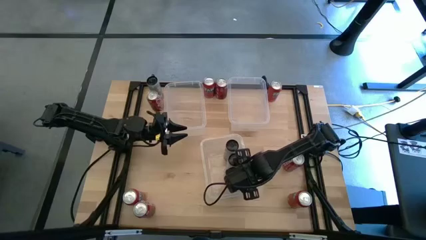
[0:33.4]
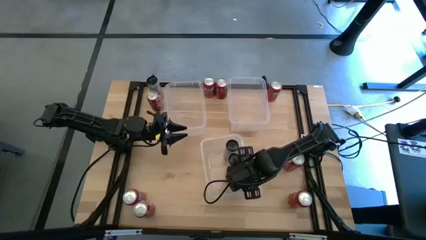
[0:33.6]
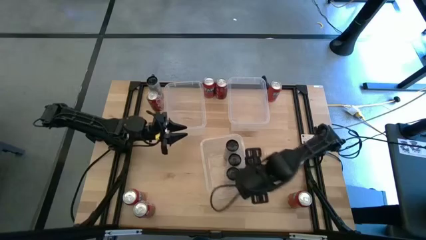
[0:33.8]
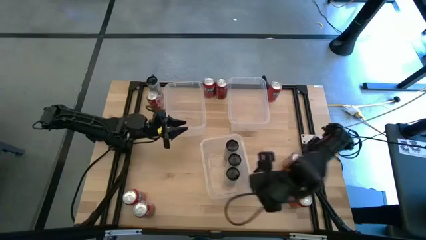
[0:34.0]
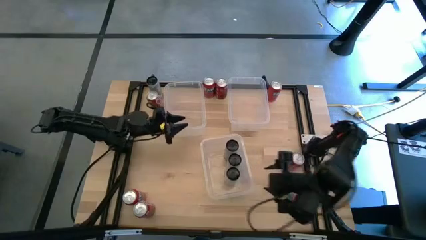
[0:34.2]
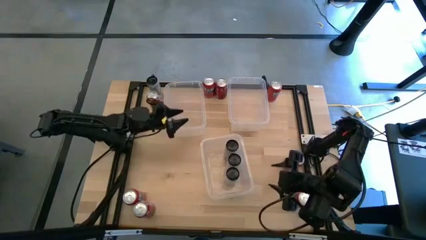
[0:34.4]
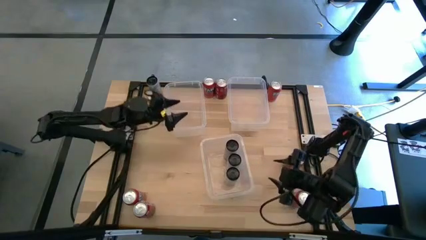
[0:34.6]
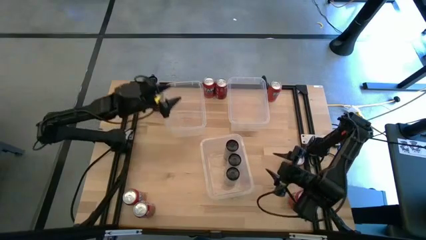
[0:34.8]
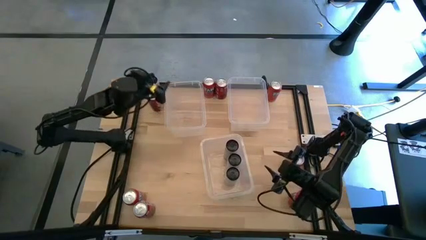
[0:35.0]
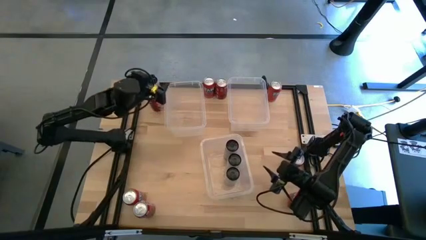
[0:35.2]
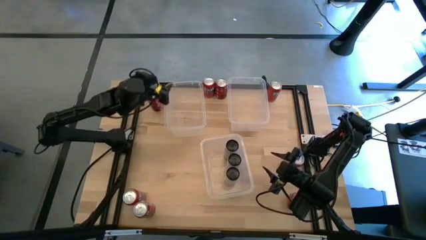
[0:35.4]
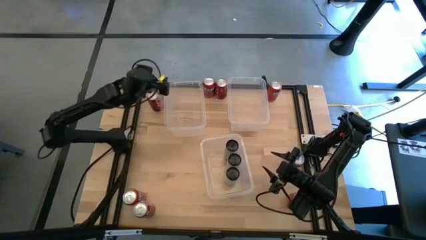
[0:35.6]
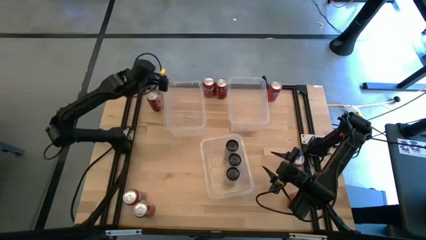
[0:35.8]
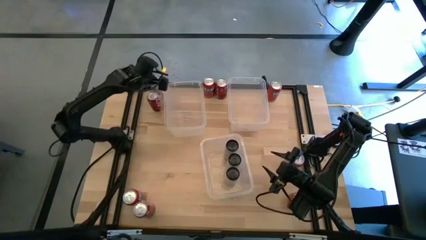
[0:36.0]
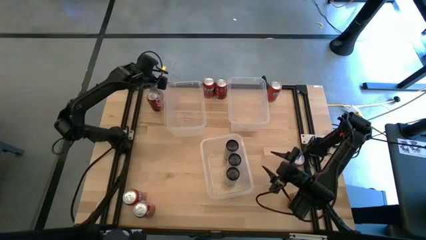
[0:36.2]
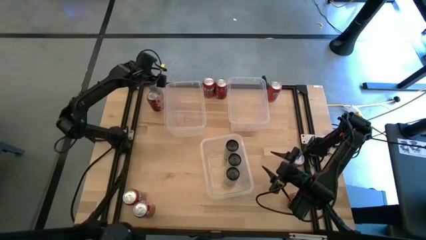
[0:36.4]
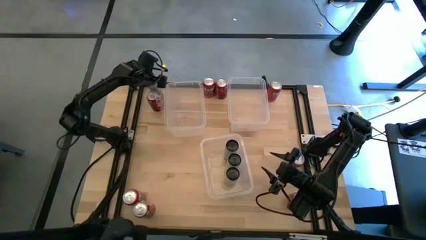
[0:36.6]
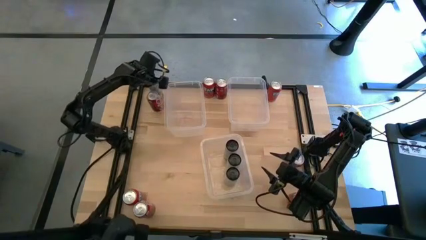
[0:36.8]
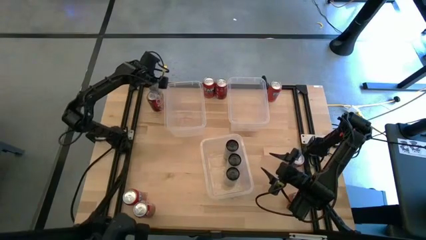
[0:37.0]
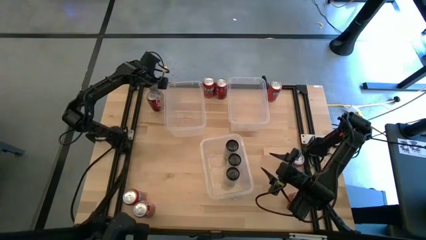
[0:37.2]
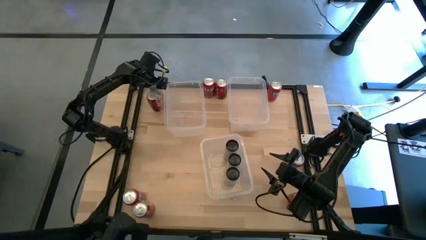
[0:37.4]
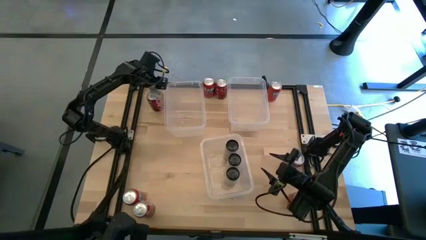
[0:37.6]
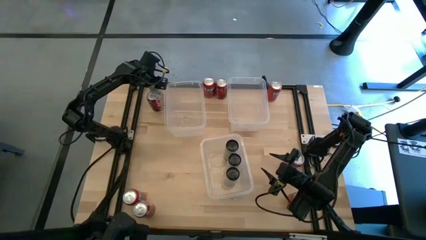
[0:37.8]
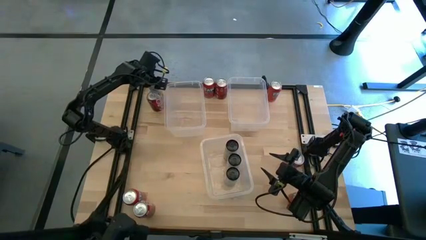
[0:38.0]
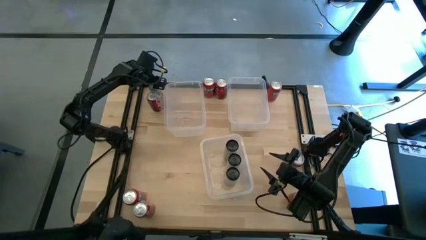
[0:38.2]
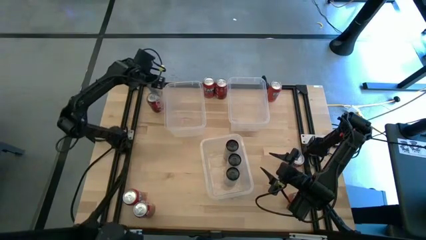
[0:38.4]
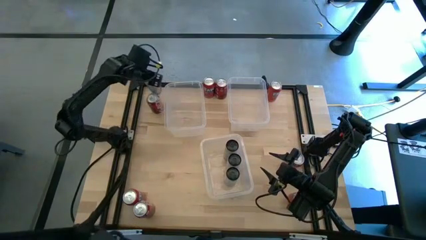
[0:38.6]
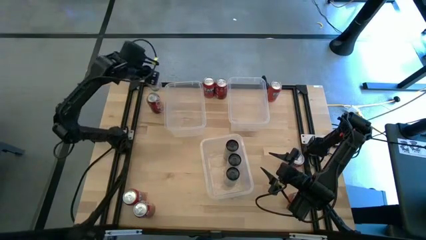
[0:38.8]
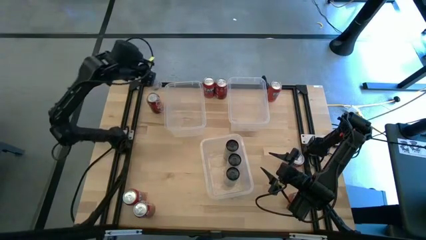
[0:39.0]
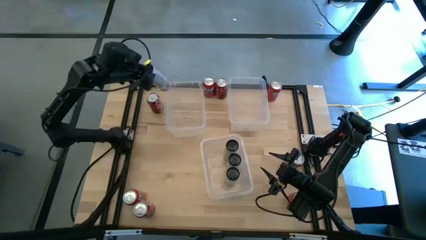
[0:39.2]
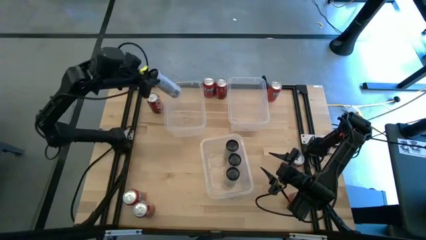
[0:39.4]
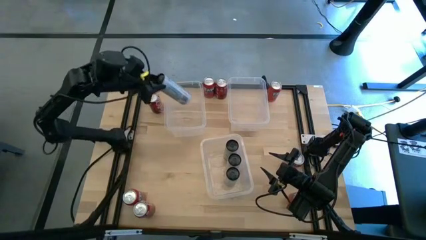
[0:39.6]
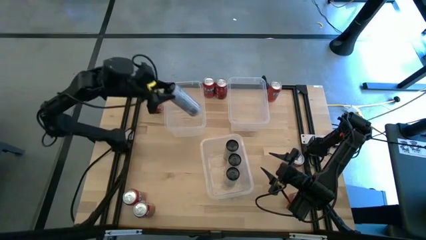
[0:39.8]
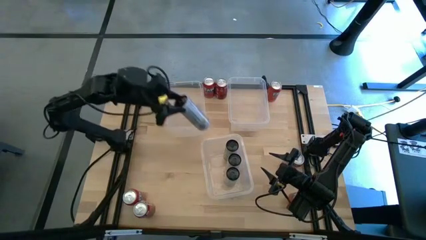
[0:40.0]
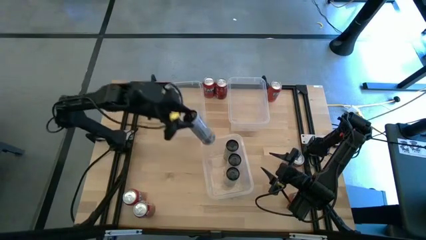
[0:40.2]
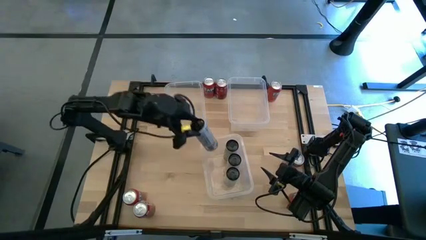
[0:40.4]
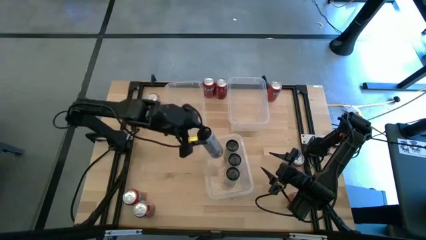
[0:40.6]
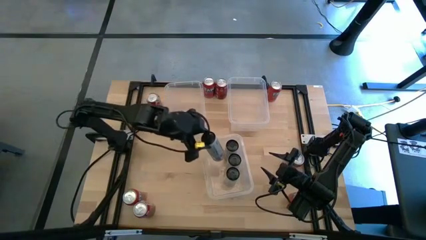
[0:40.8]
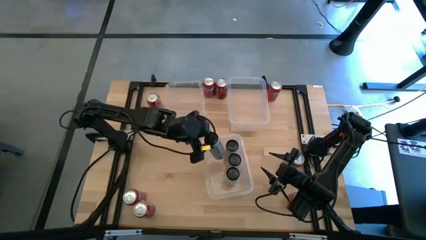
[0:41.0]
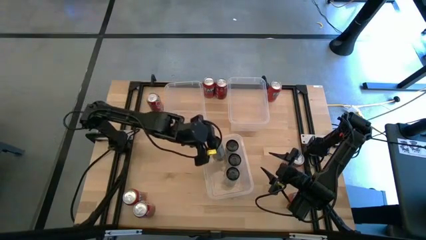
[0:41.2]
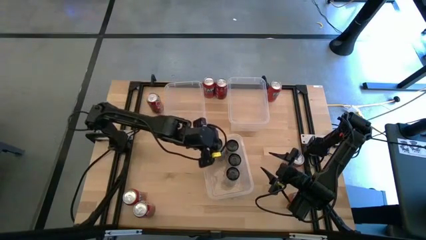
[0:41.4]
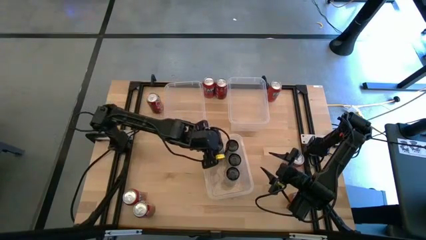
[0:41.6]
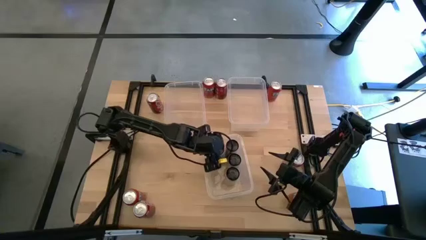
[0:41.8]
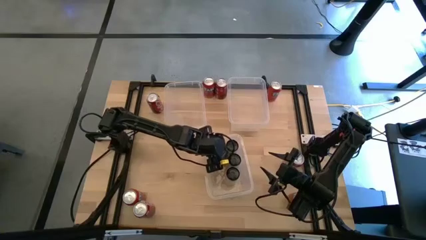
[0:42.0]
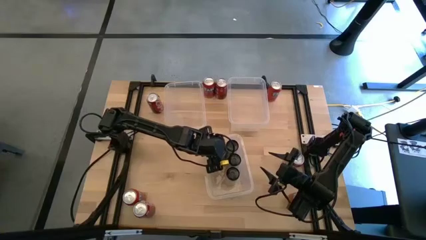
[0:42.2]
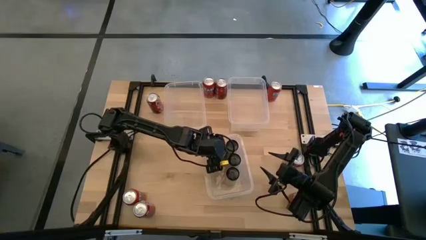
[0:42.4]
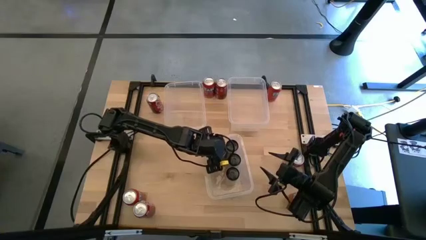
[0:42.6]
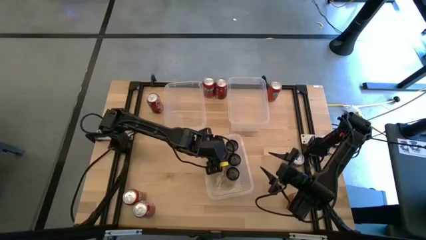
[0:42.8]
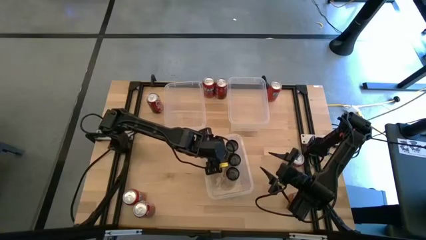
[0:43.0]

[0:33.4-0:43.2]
Task: Sort soda cans
Put the white/yellow soda can into the bottom transparent bin

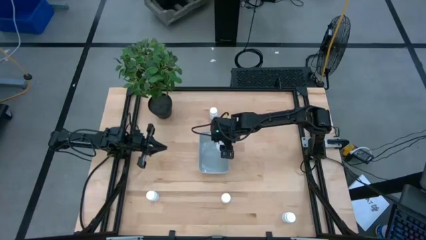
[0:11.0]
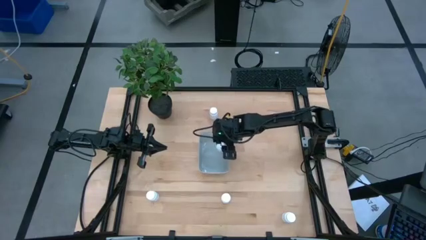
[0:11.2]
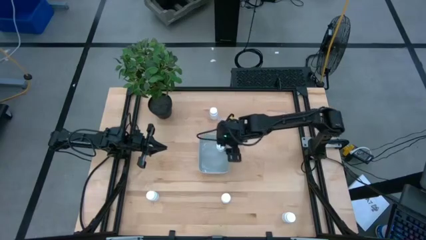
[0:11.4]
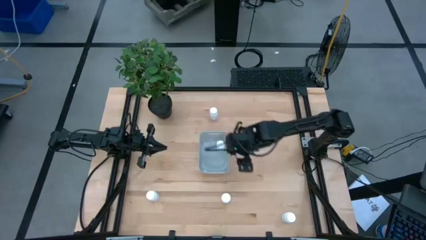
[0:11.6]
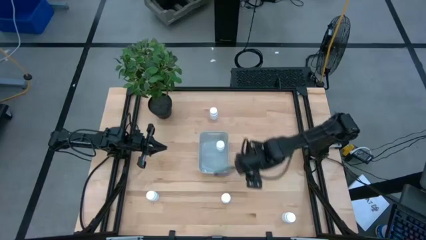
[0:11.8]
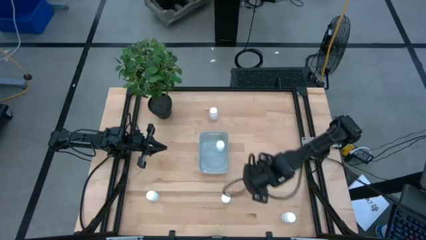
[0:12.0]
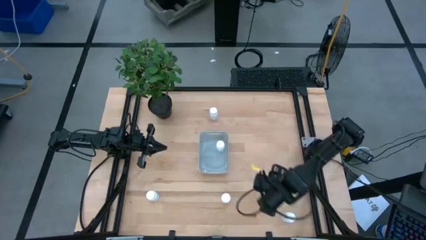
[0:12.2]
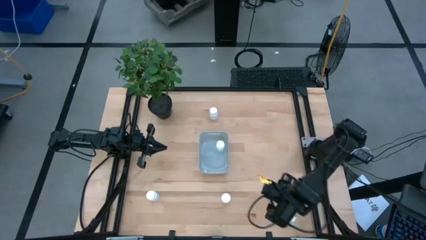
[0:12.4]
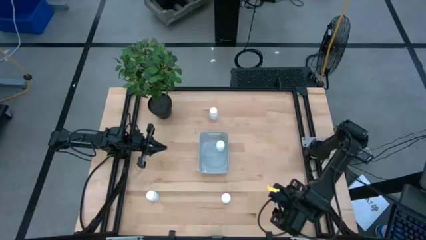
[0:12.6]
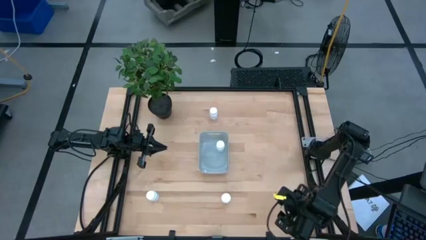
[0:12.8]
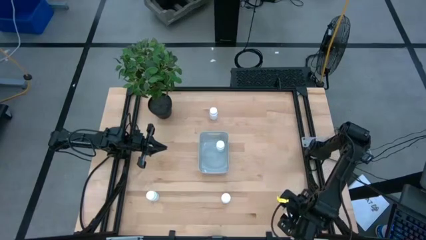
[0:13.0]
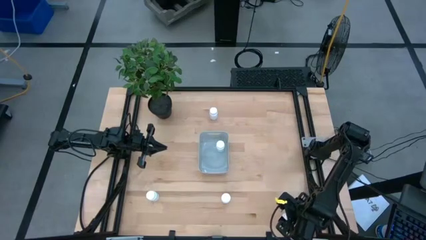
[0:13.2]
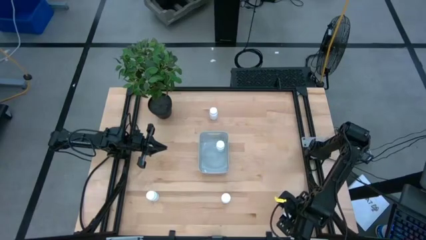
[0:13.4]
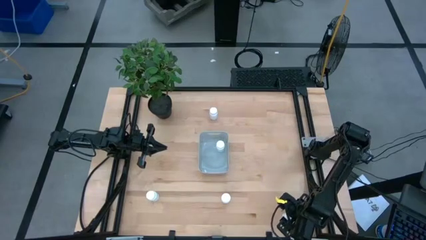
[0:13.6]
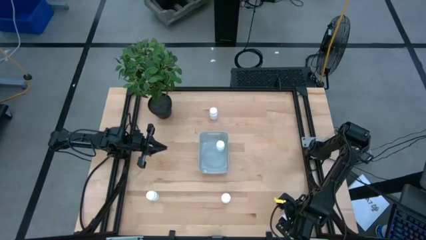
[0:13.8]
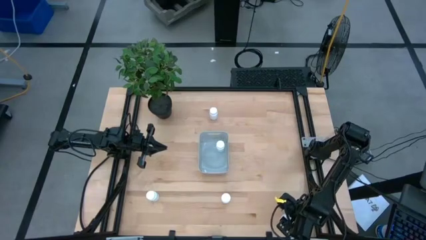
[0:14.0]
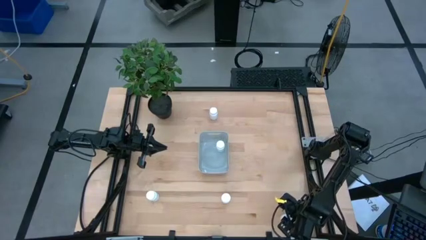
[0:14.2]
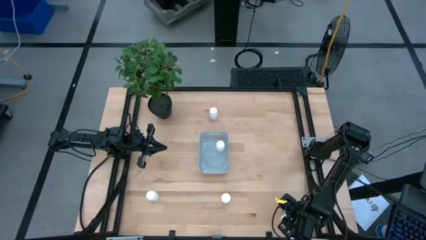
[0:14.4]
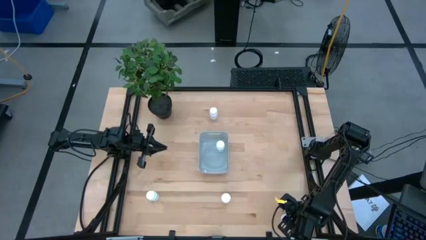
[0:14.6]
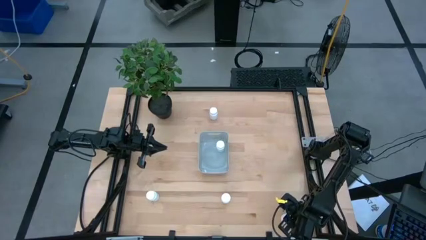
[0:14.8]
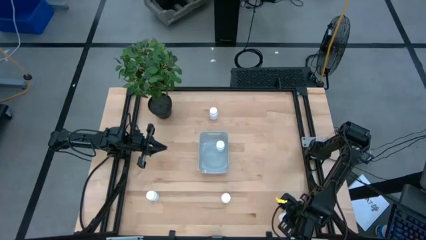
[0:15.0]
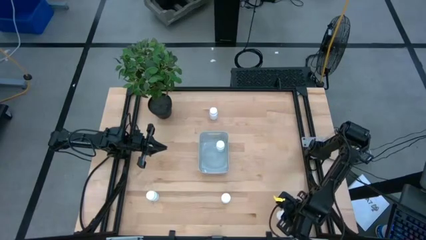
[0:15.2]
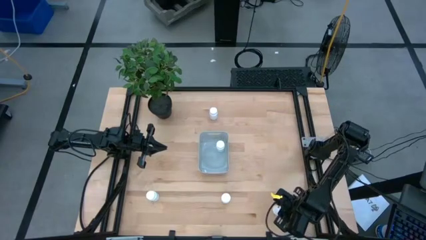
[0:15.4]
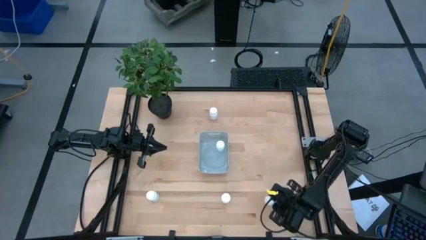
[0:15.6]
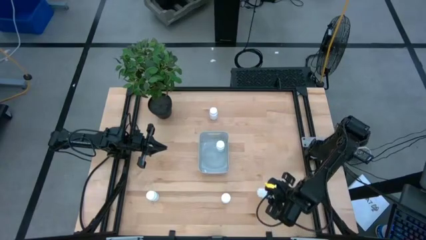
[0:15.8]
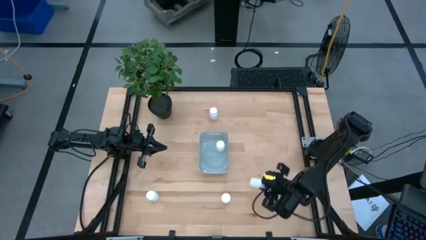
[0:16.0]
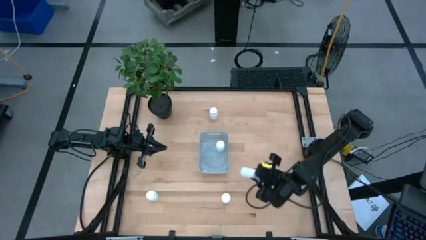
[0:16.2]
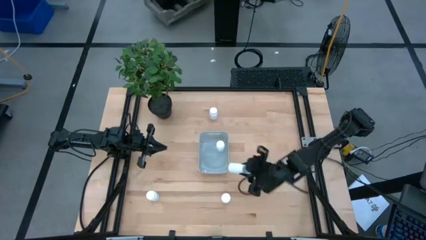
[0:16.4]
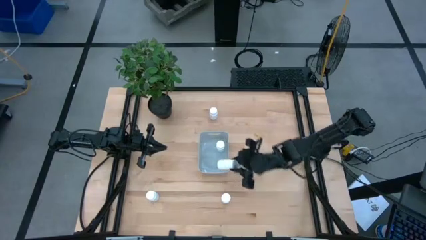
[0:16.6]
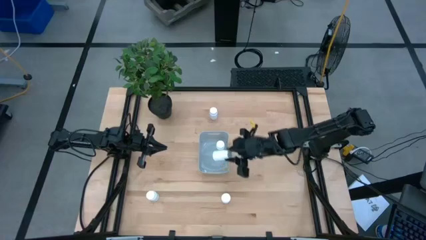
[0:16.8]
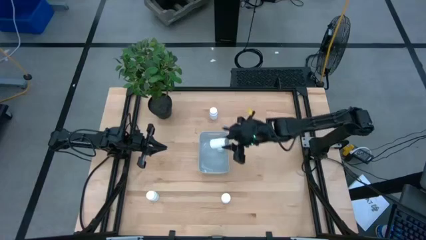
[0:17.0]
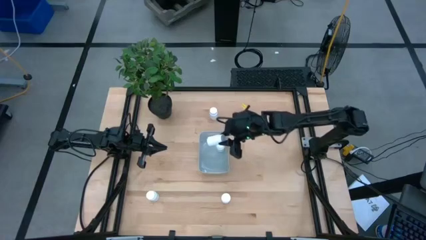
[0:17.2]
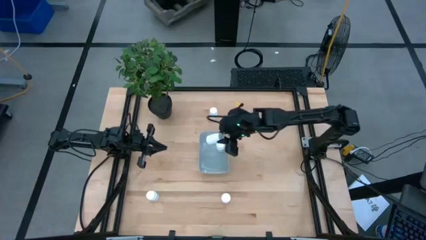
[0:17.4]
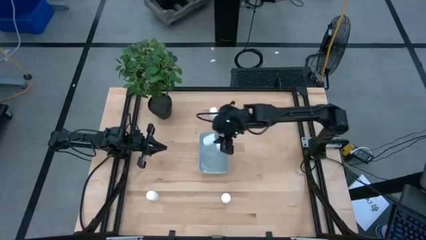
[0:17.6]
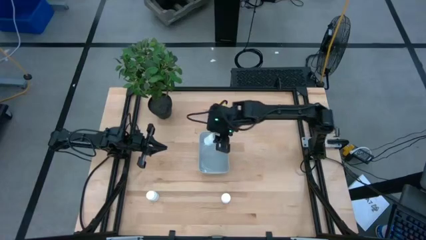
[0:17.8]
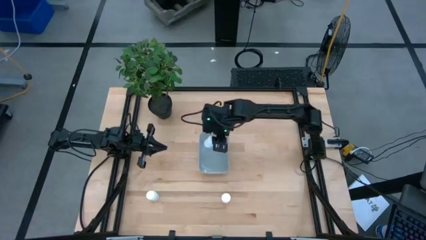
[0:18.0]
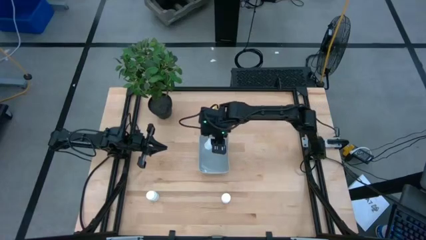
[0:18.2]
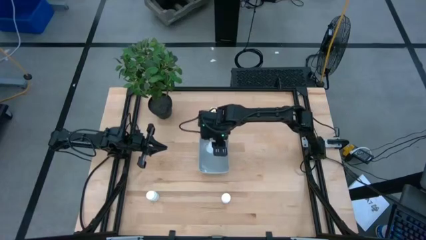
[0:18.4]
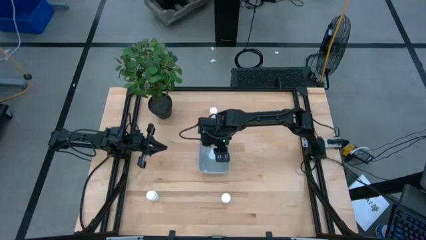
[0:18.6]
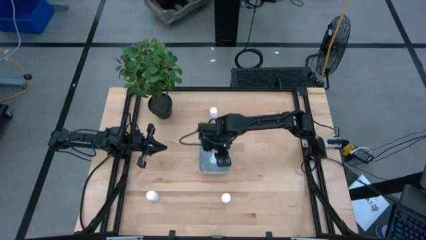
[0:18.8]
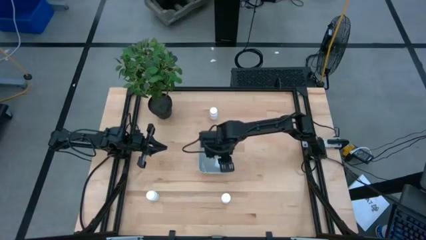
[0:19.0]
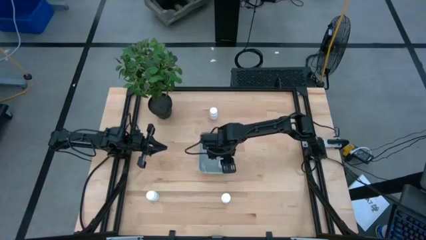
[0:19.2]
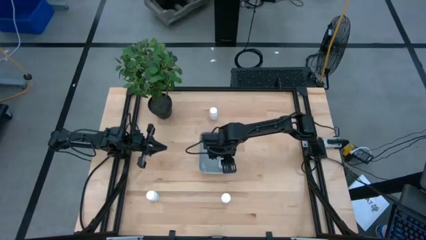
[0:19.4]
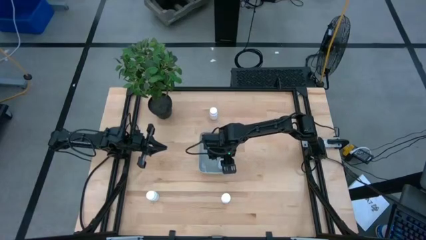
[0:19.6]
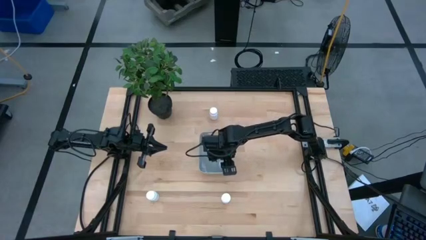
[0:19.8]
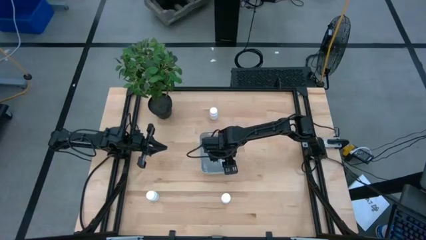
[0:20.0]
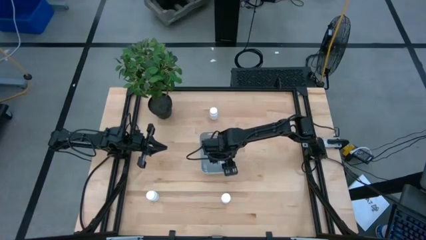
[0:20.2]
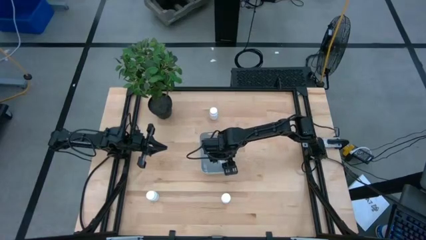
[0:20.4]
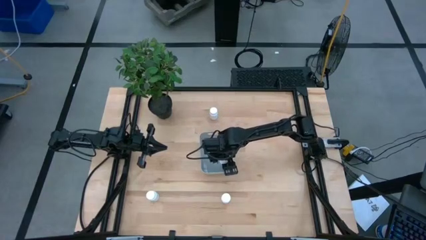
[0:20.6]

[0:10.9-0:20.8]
Task: Pick and place pill bottles into a basket
Put the white medicine bottle into the gray bin
